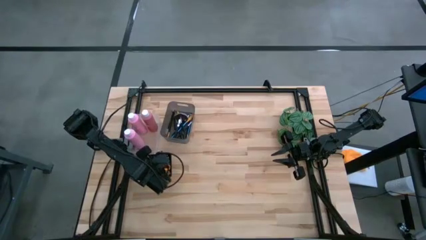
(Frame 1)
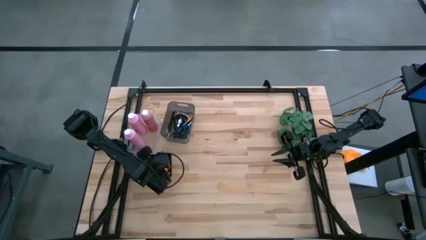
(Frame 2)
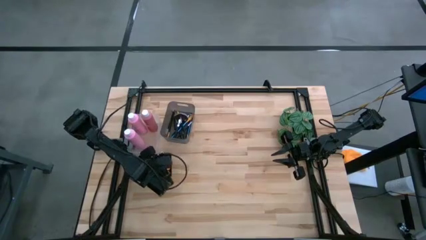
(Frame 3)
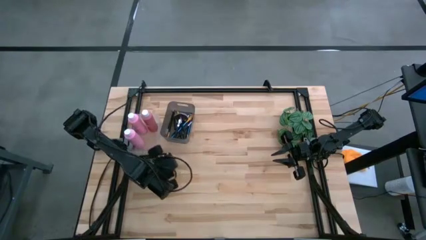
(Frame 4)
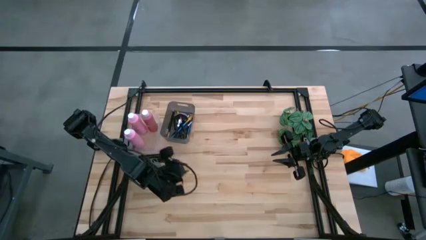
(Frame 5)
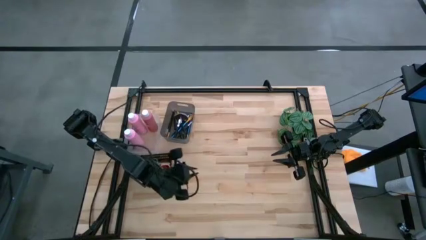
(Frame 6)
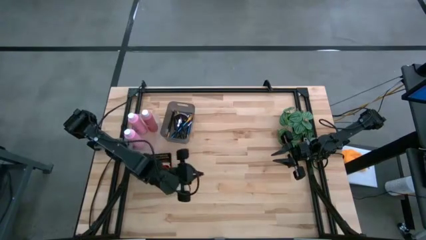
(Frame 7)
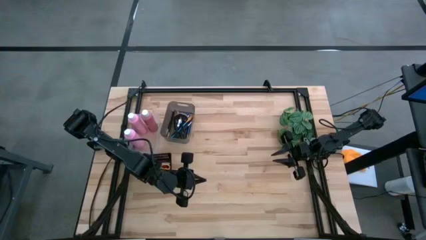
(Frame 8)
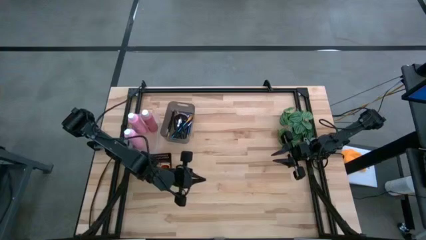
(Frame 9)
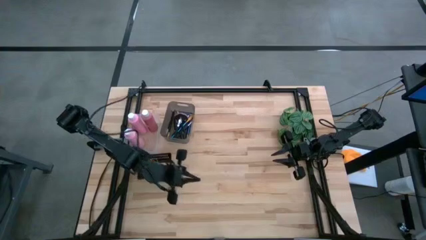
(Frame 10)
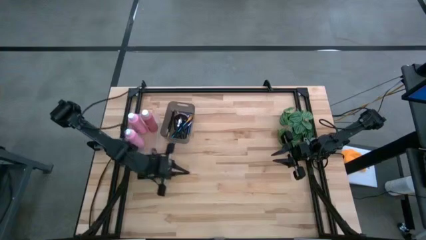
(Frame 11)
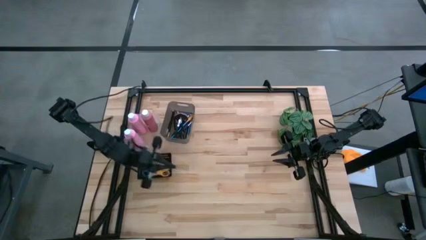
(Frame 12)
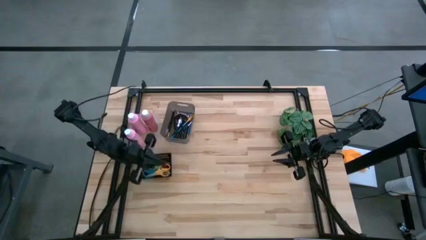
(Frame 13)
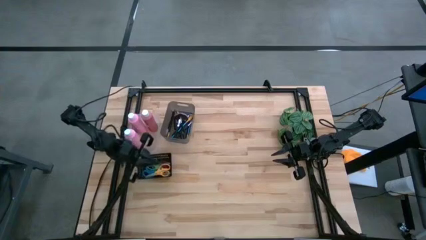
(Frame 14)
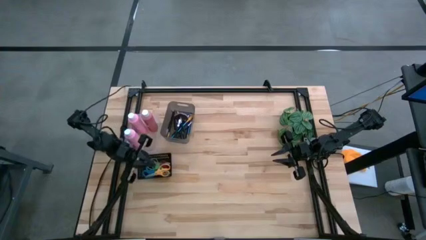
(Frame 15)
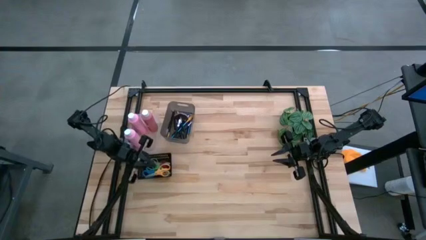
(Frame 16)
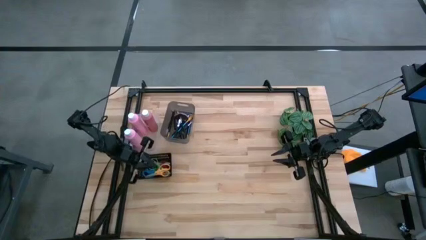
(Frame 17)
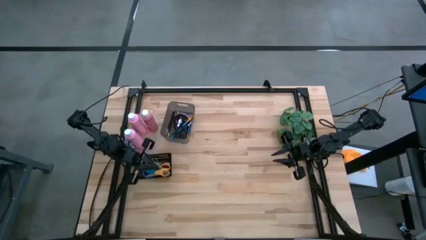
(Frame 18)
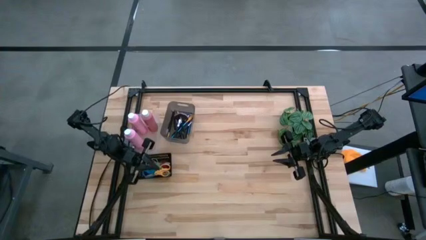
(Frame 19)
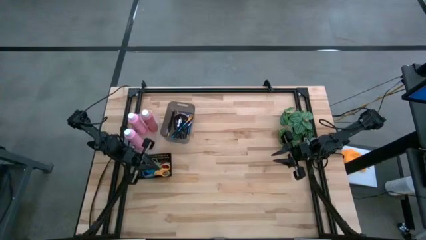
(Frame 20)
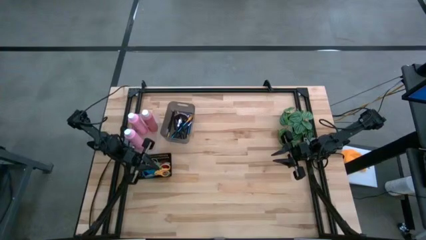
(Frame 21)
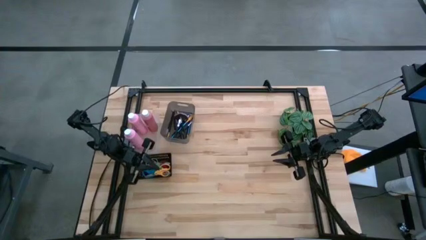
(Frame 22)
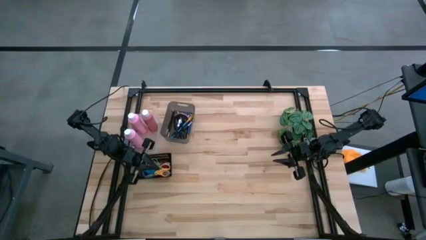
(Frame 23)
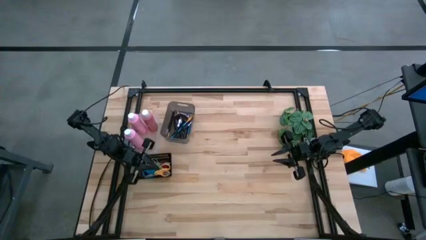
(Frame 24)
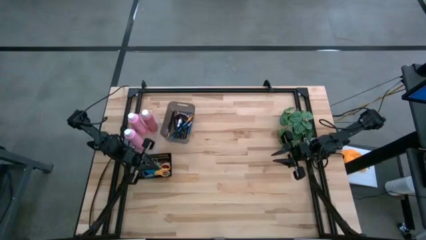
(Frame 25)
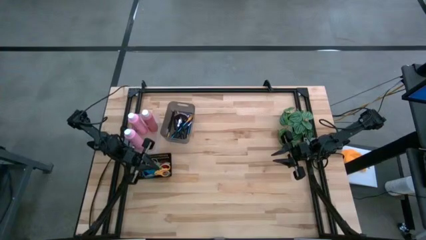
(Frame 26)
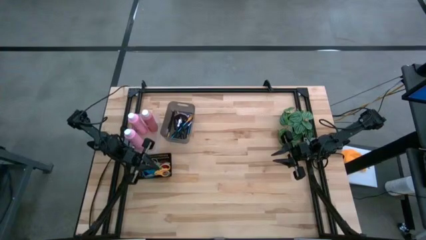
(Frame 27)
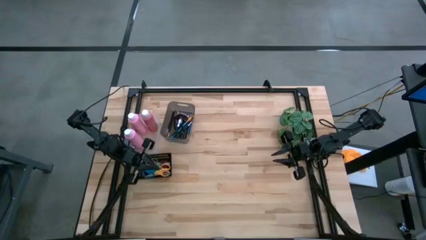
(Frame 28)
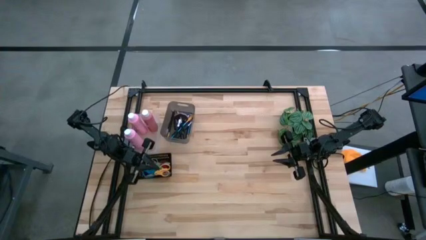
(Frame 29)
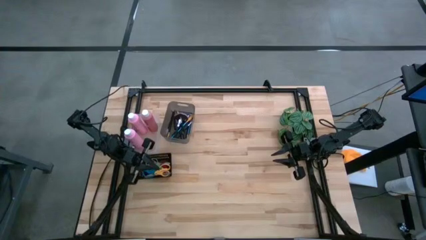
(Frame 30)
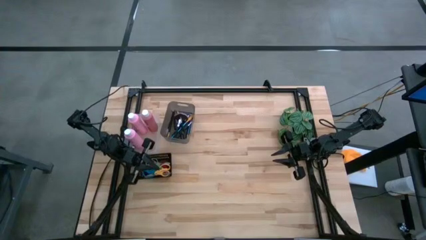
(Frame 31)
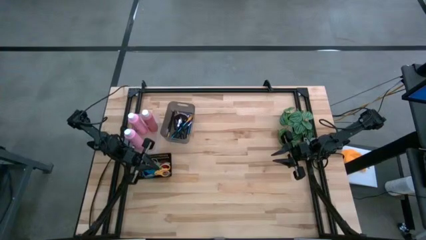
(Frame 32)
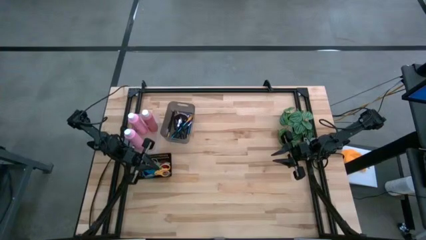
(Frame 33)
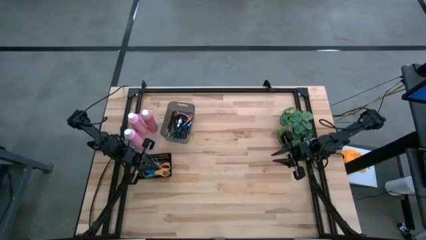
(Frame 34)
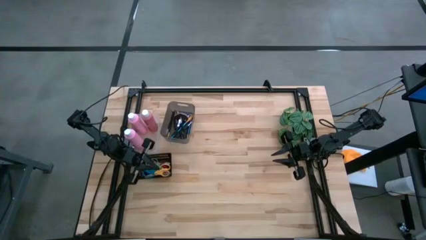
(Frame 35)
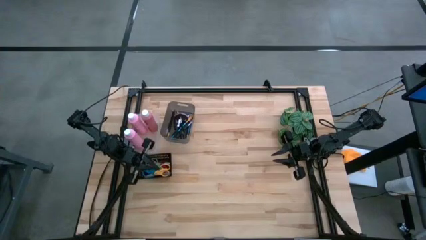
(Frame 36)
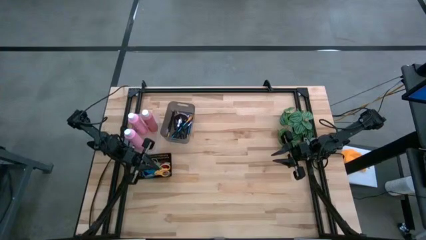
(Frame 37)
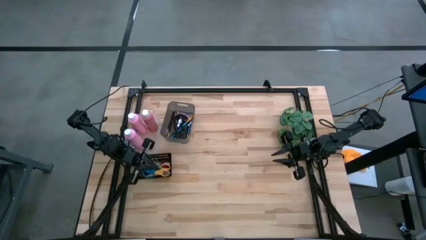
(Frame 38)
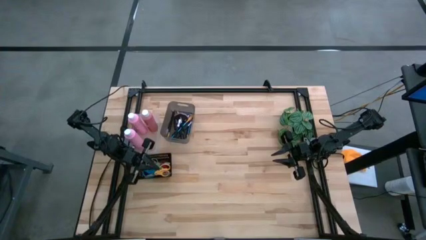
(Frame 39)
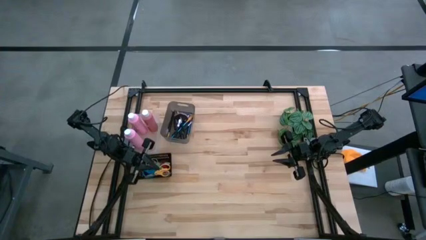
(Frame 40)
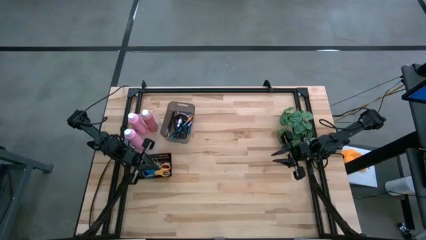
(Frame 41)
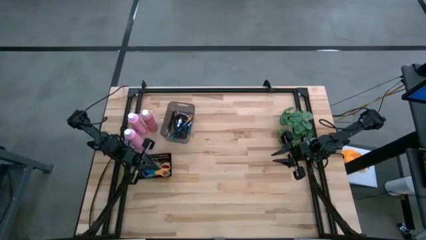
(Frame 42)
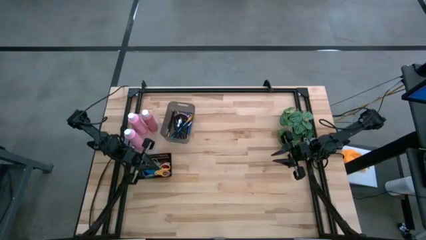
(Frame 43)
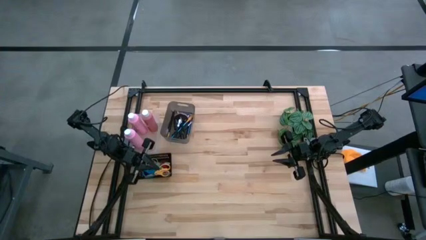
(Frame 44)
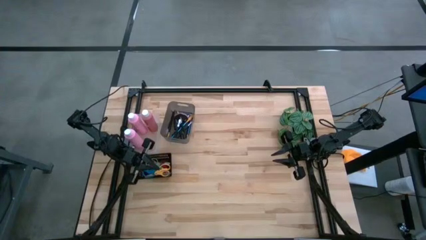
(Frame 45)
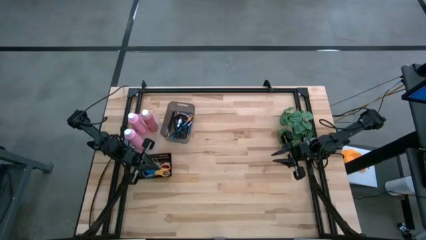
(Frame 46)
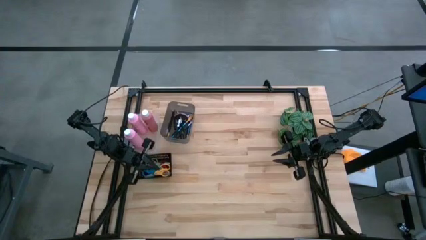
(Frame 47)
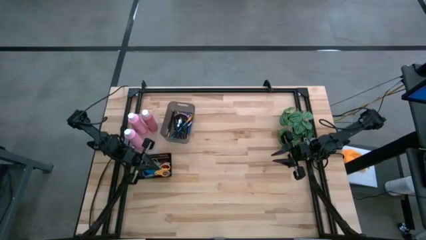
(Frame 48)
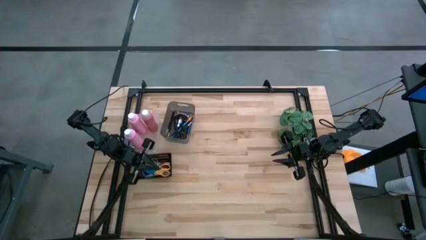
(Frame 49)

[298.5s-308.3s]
Task: Pick & Place Paint Supplies
Return to Home Position
